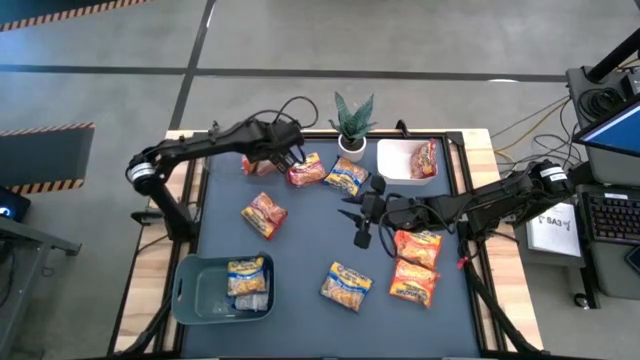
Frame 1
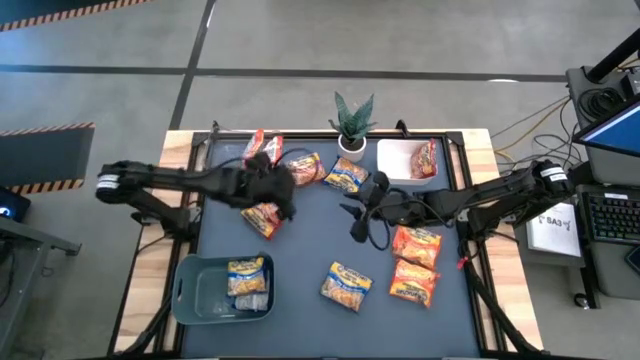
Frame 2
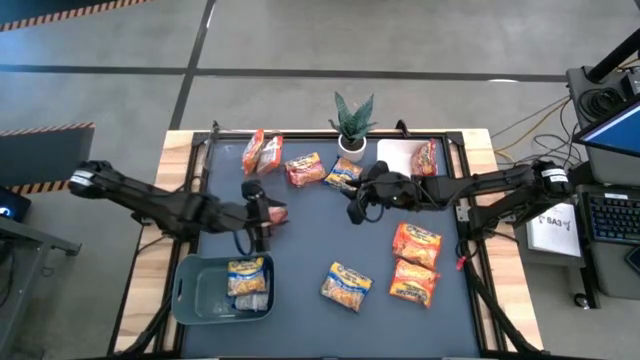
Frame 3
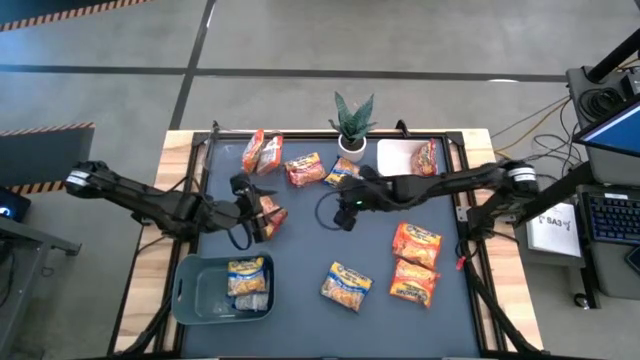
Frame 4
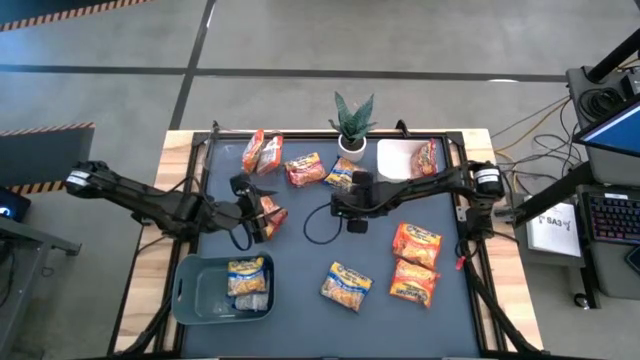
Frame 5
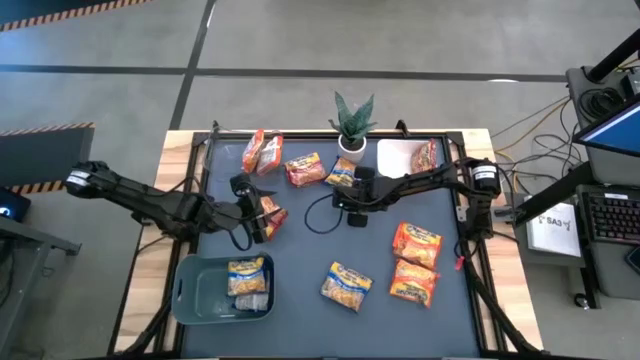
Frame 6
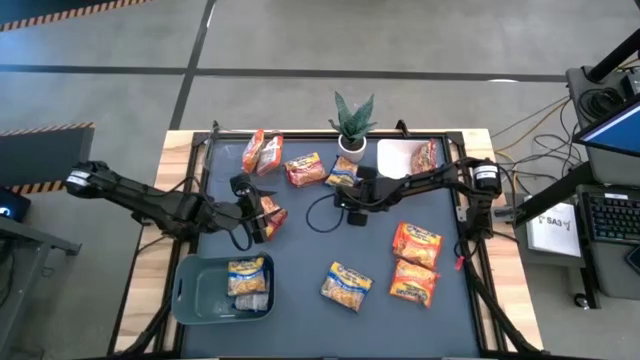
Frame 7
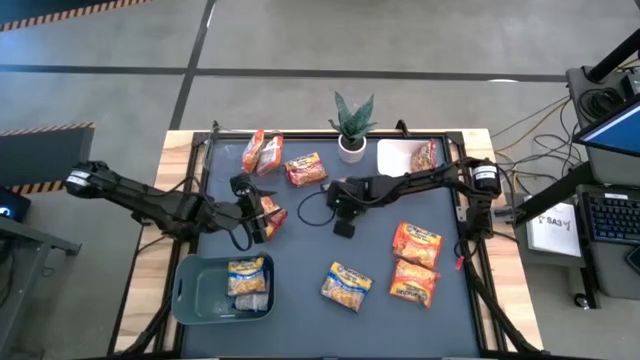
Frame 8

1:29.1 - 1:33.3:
Task: Sort Maruchan noodles
Put the blue noodle pack into the blue bin

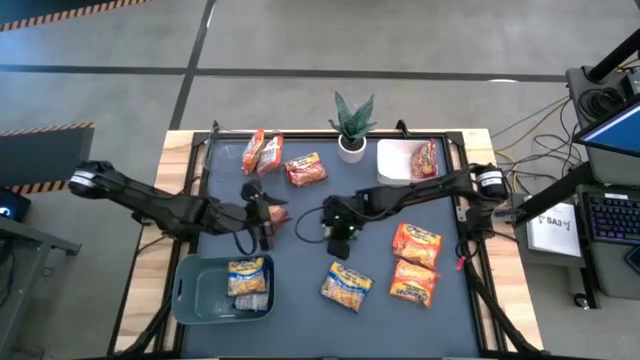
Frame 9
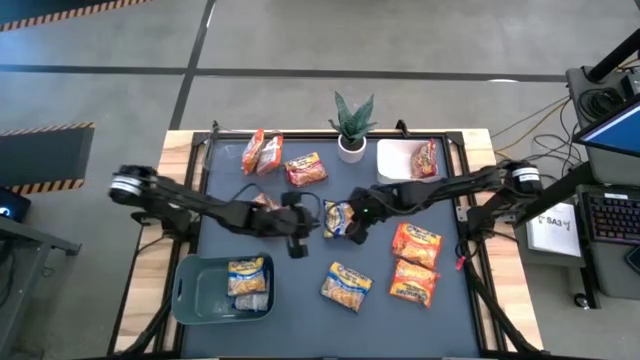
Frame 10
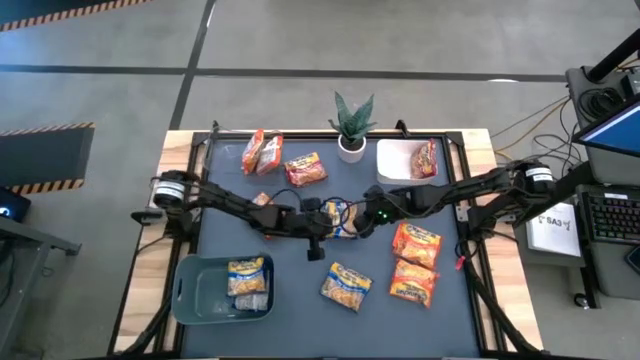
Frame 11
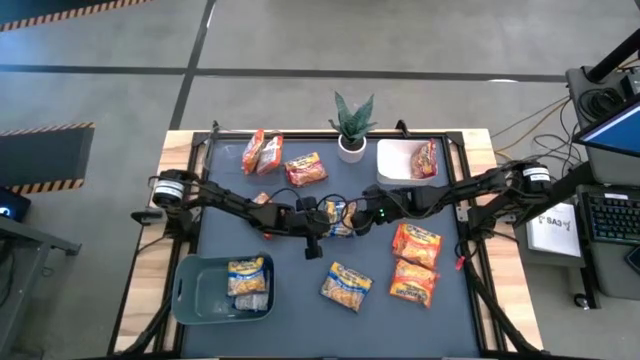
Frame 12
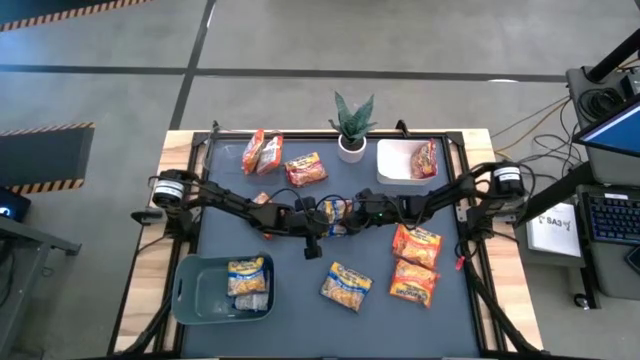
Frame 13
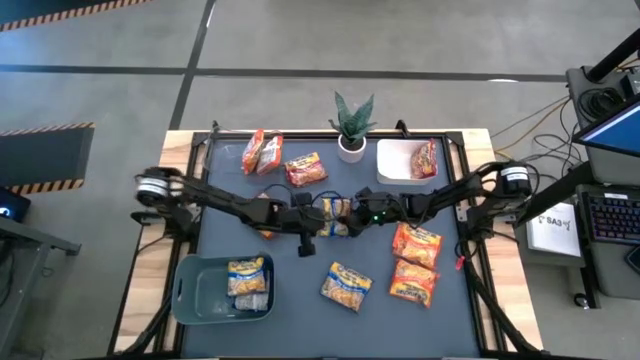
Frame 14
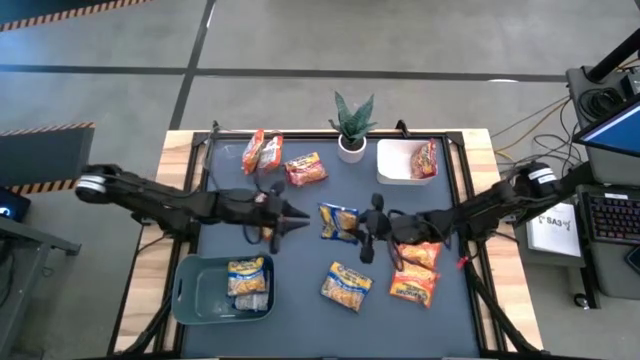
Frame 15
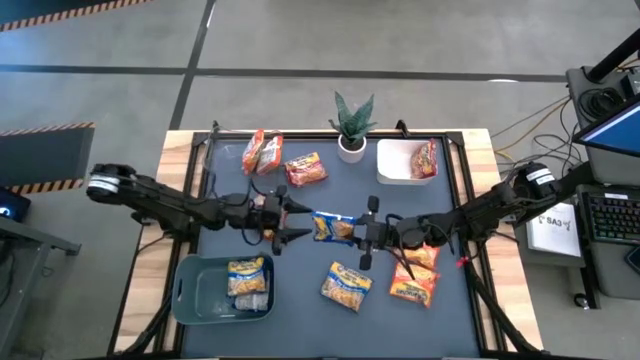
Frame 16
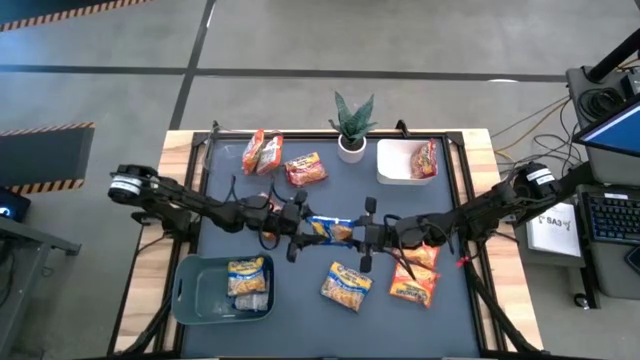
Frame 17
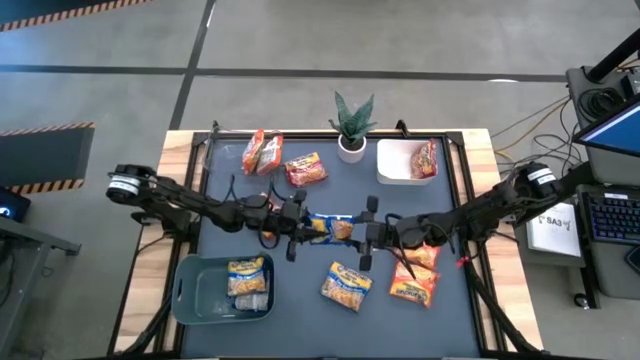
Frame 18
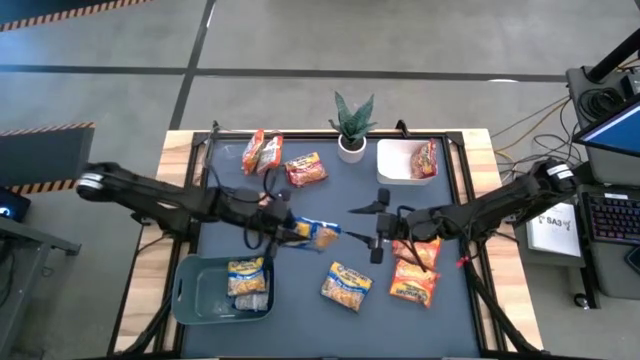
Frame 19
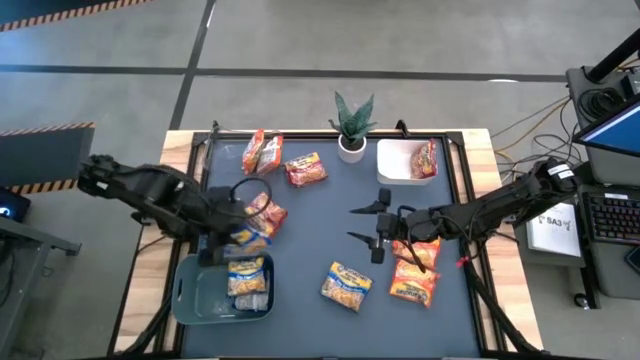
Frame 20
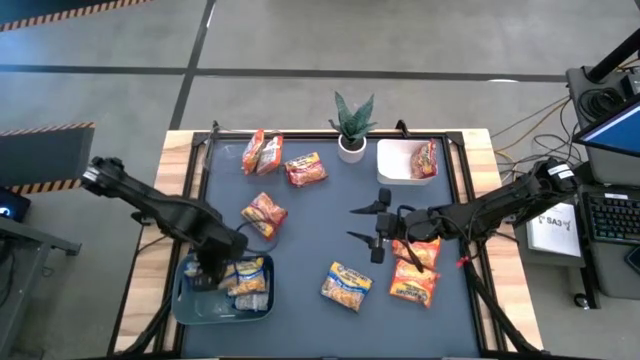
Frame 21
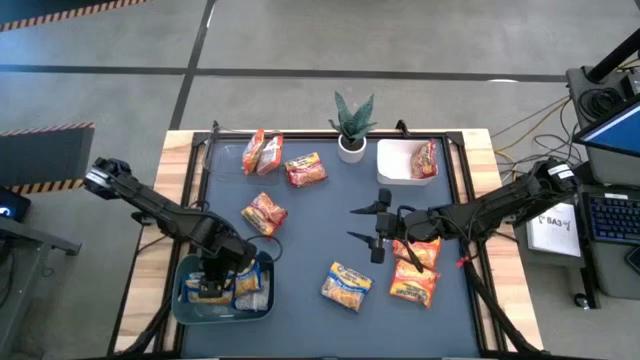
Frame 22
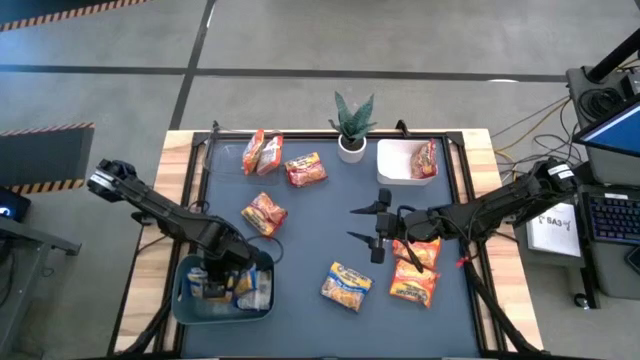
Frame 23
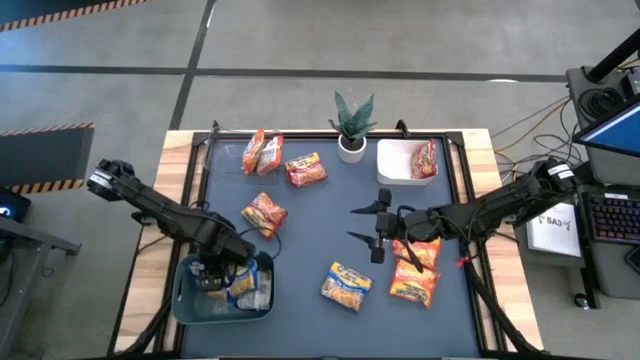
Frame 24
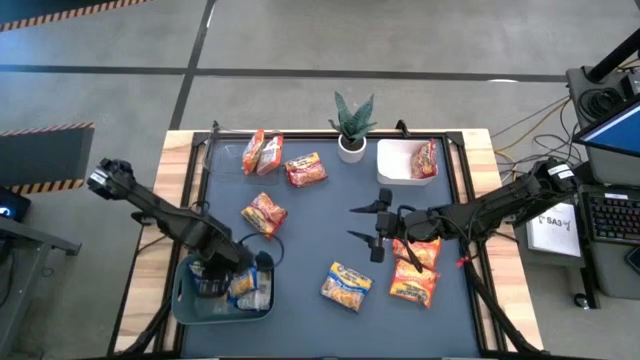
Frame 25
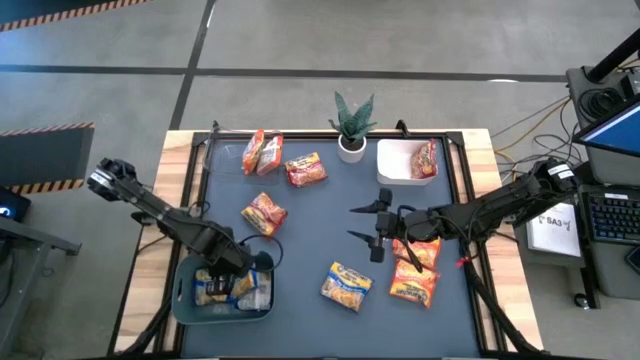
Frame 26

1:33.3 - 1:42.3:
Put the blue noodle pack into the blue bin

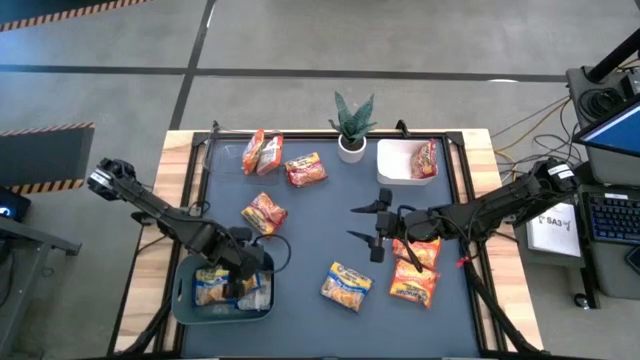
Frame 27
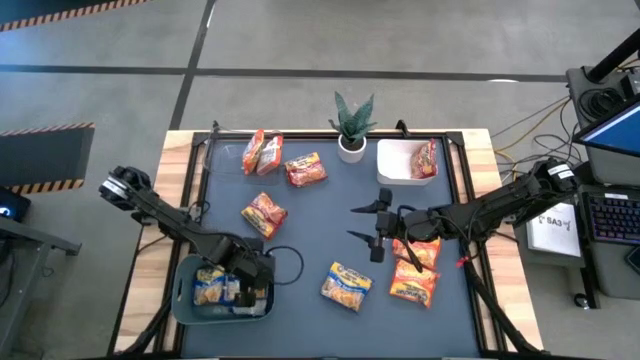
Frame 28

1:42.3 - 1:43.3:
Adjust the blue noodle pack

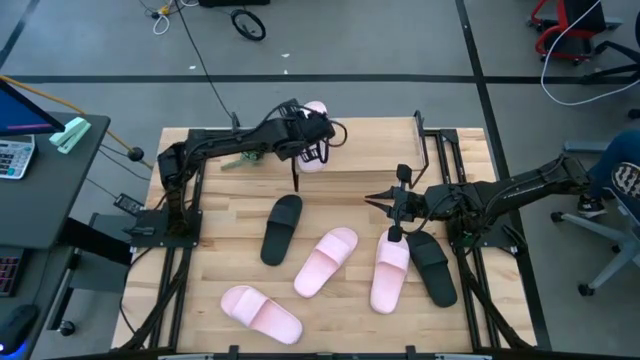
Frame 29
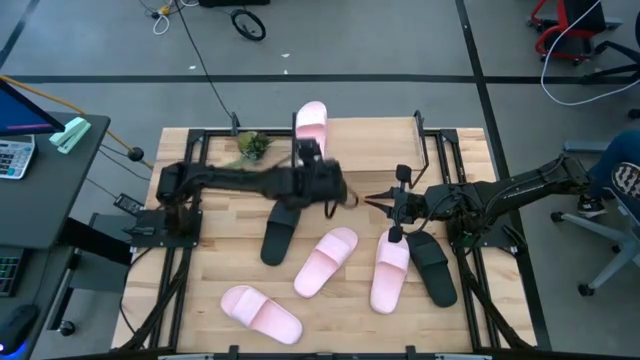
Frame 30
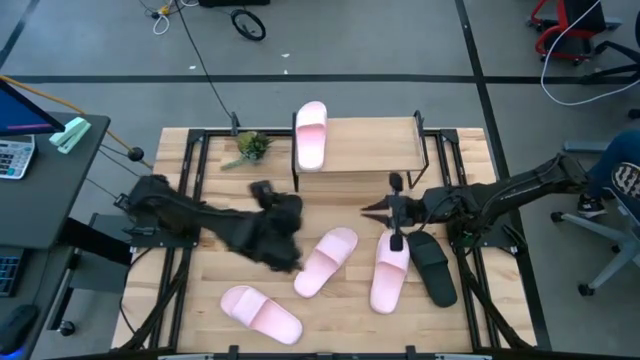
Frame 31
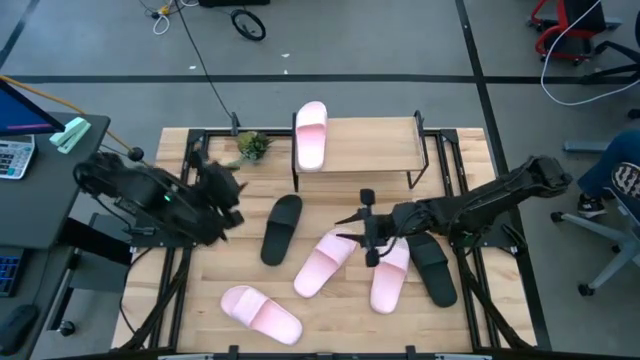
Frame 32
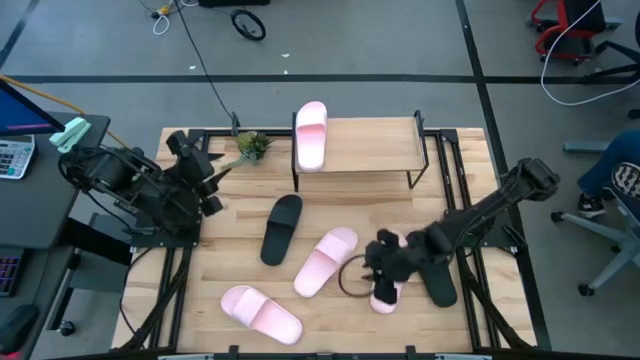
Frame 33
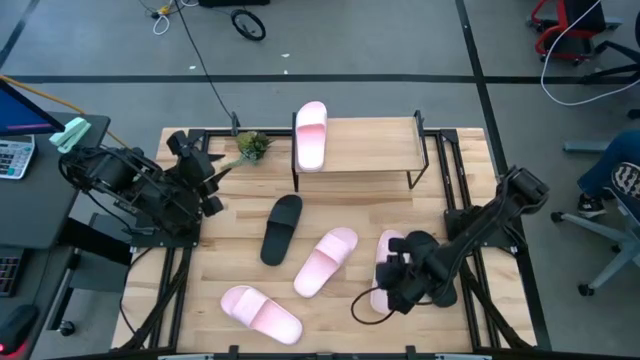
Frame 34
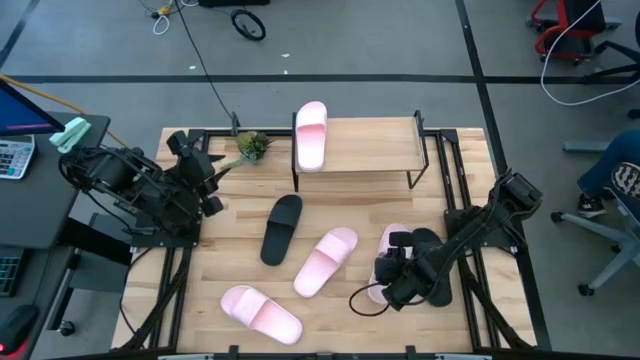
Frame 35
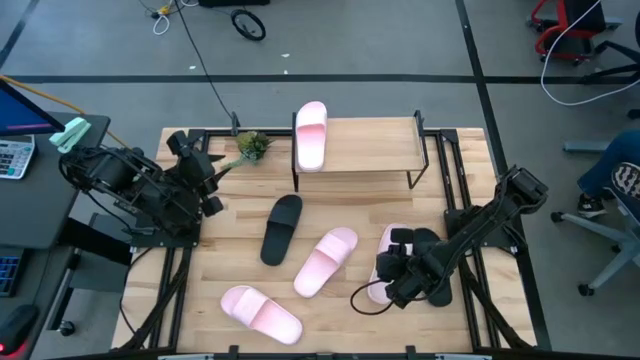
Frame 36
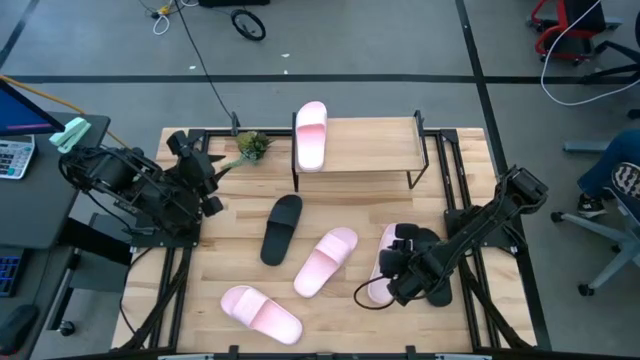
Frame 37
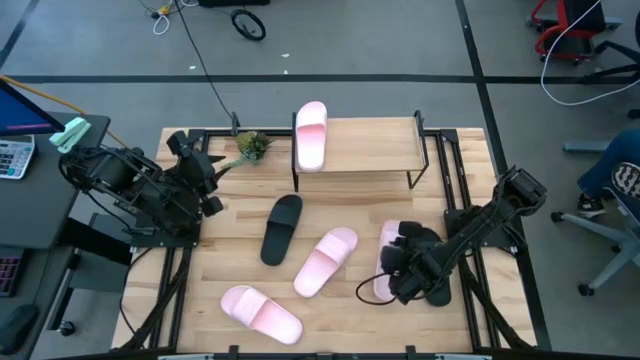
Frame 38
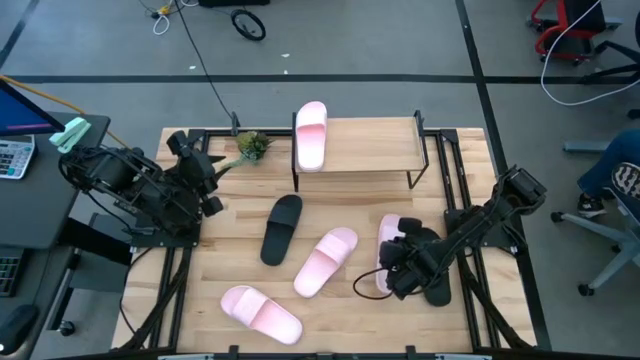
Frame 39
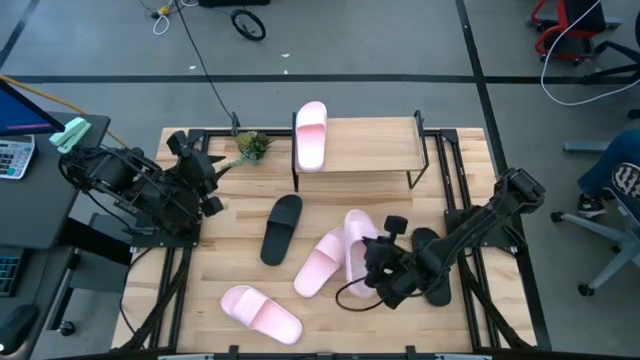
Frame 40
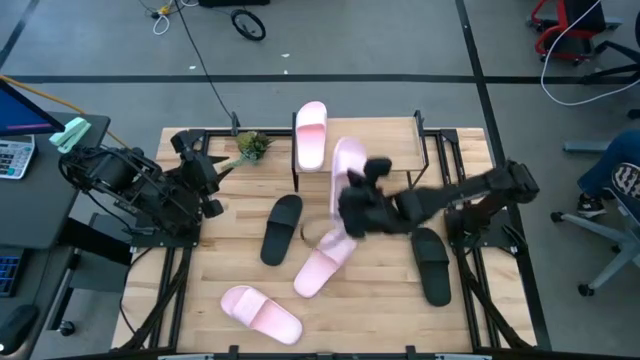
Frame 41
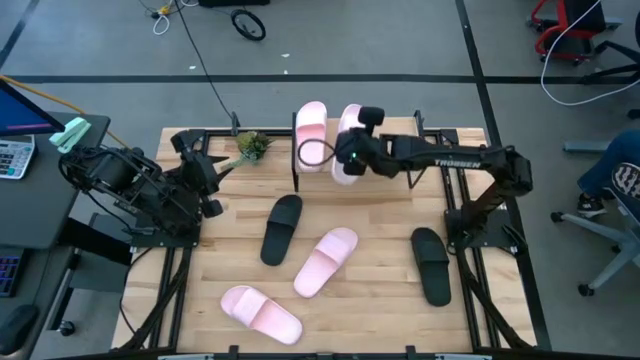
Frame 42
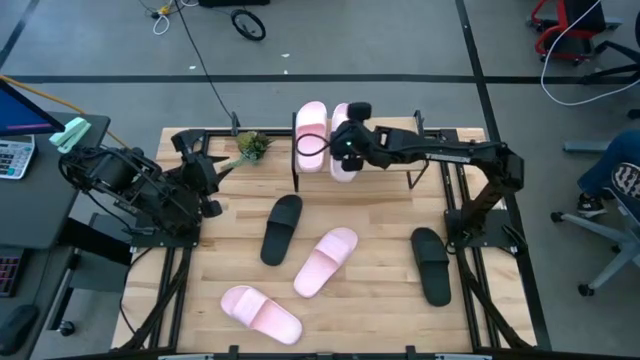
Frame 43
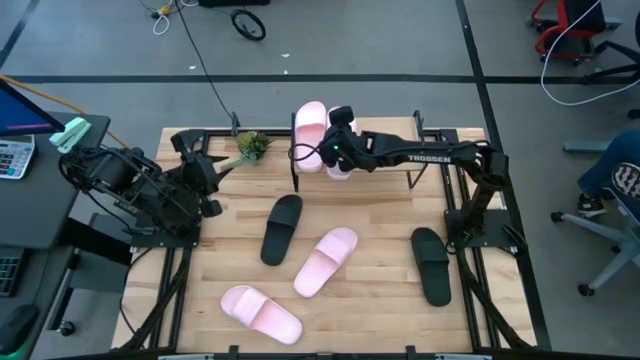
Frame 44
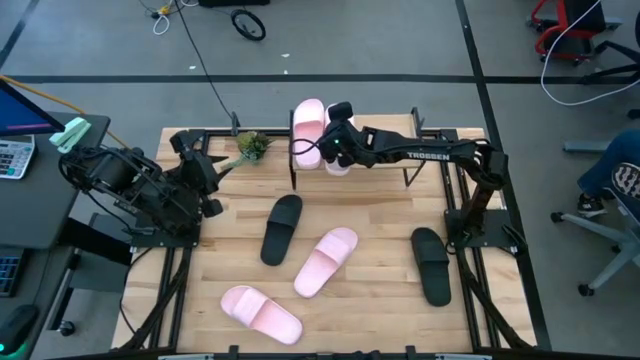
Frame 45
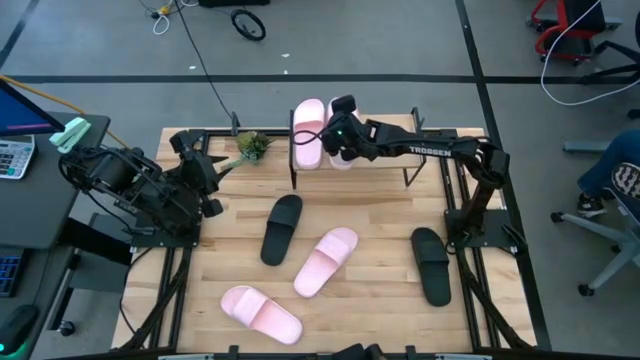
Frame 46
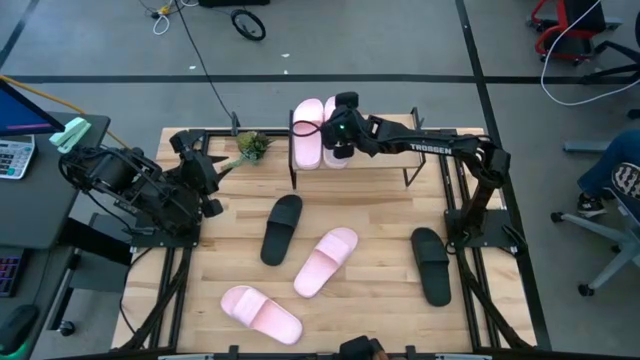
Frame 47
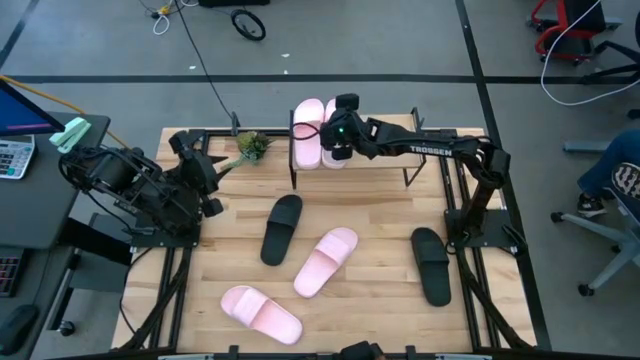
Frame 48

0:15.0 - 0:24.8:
Task: Pick and place slides into the shelf
Put the right pink slide on the shelf
